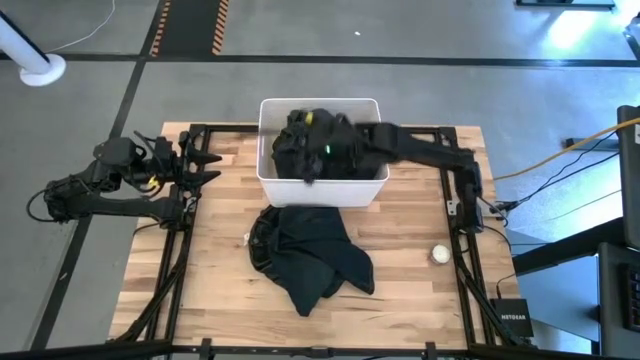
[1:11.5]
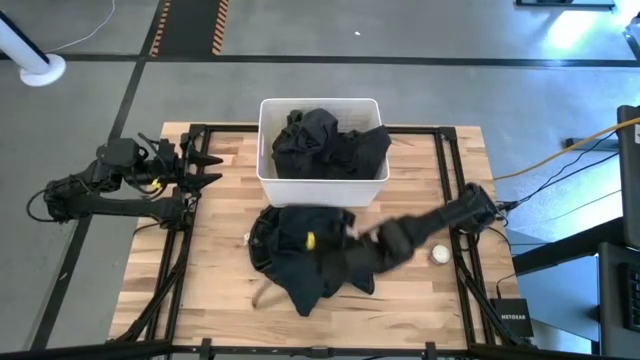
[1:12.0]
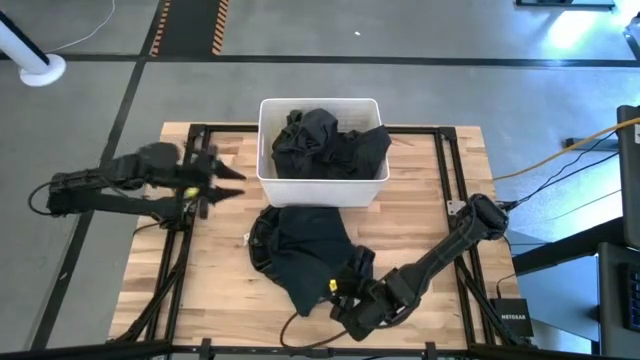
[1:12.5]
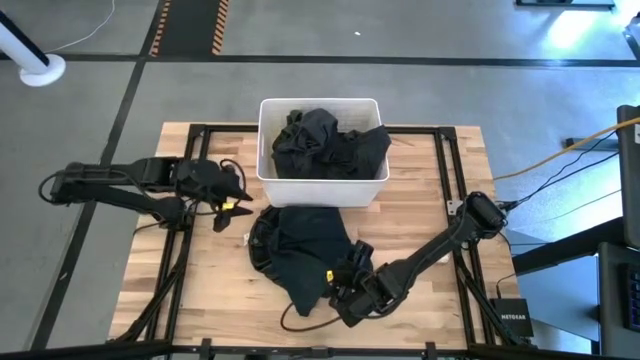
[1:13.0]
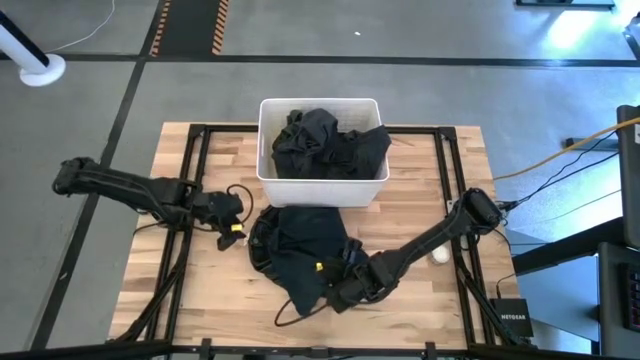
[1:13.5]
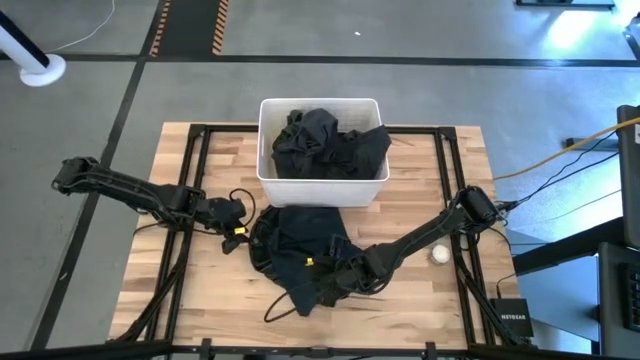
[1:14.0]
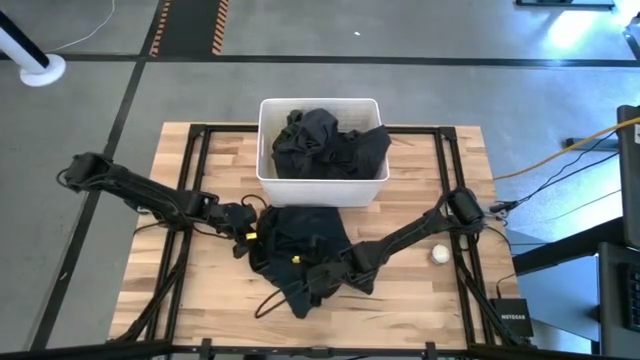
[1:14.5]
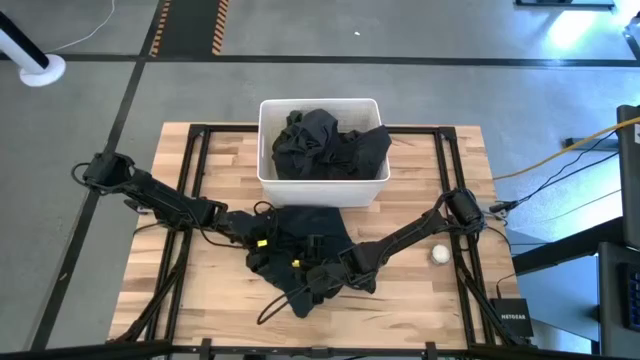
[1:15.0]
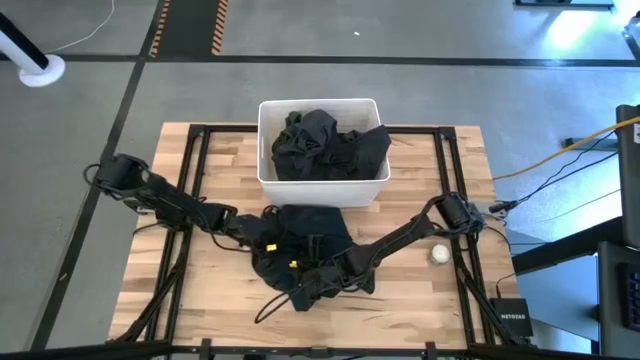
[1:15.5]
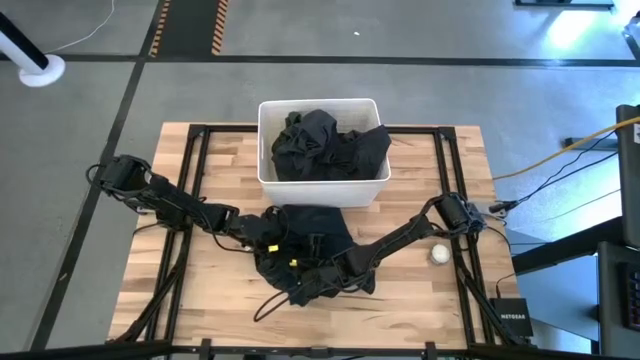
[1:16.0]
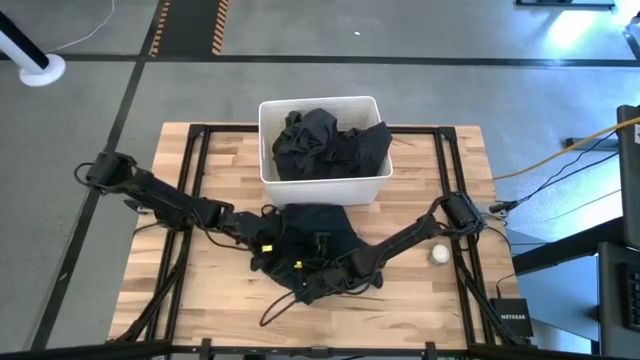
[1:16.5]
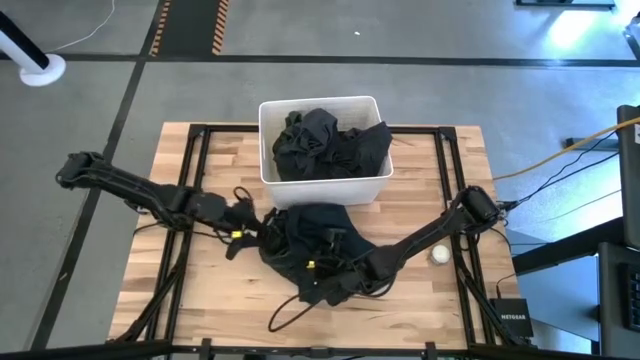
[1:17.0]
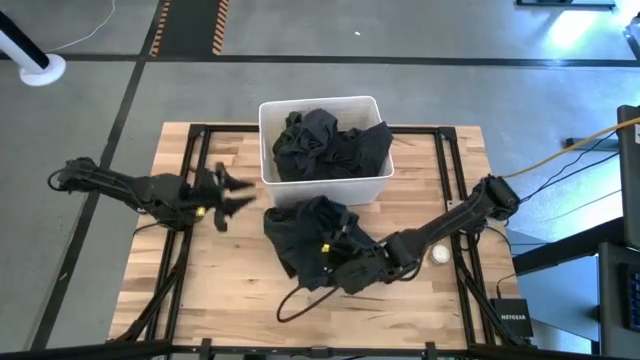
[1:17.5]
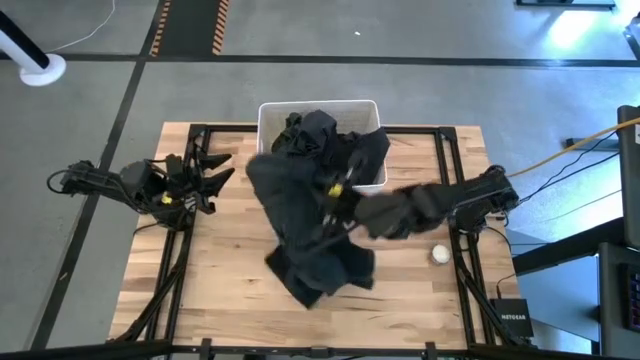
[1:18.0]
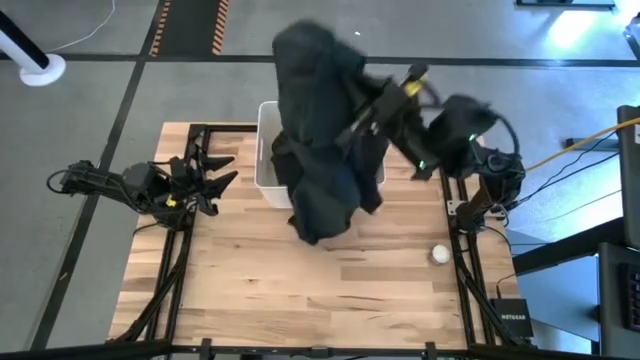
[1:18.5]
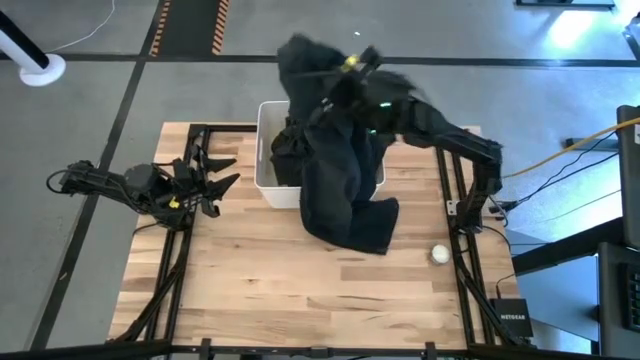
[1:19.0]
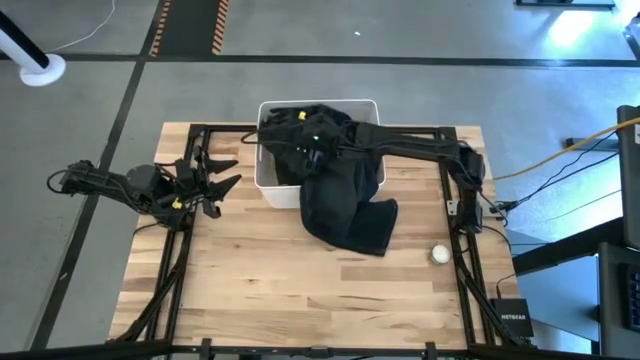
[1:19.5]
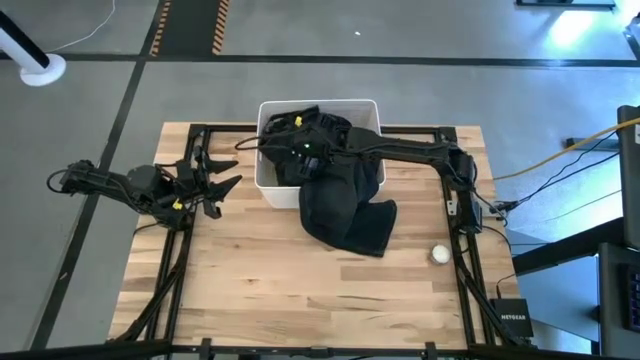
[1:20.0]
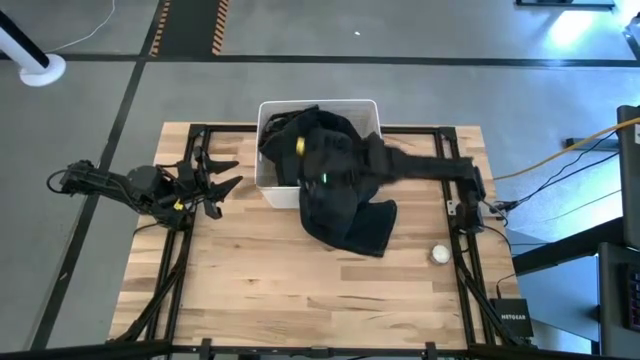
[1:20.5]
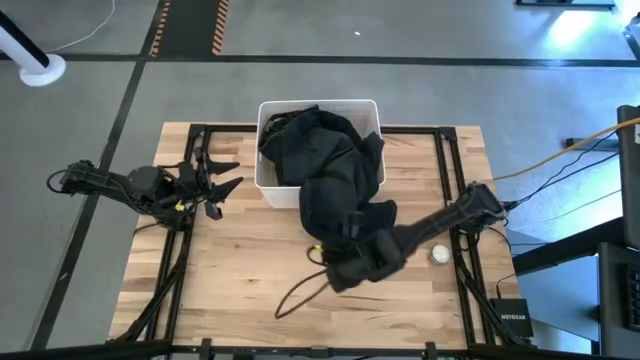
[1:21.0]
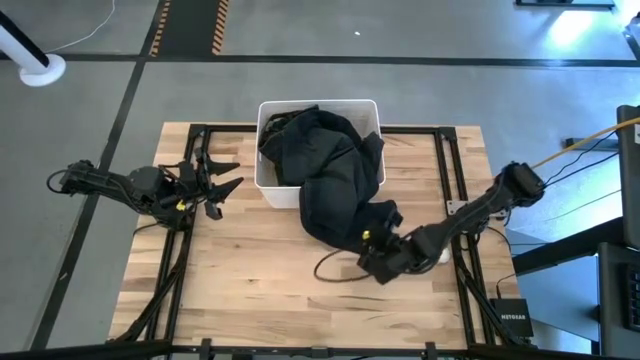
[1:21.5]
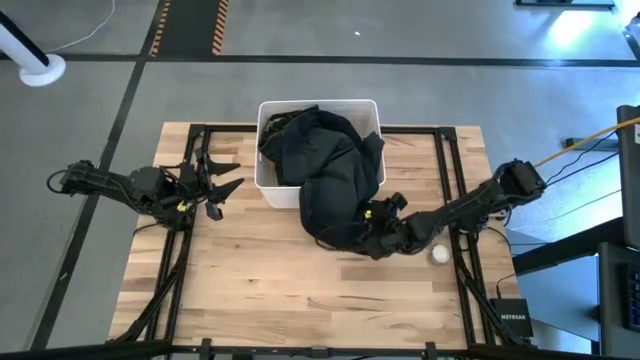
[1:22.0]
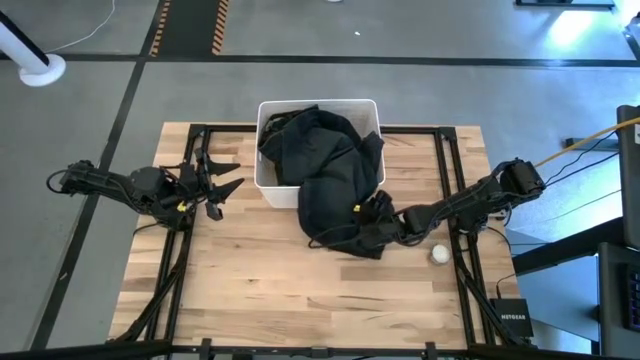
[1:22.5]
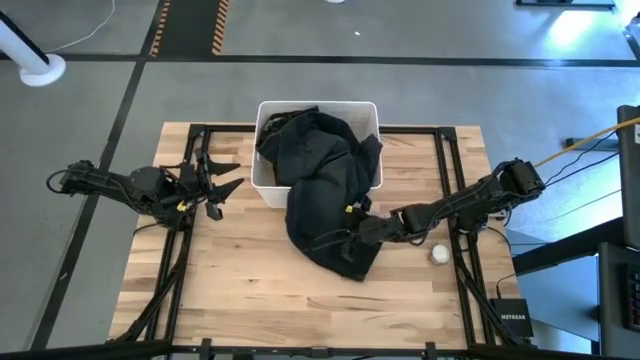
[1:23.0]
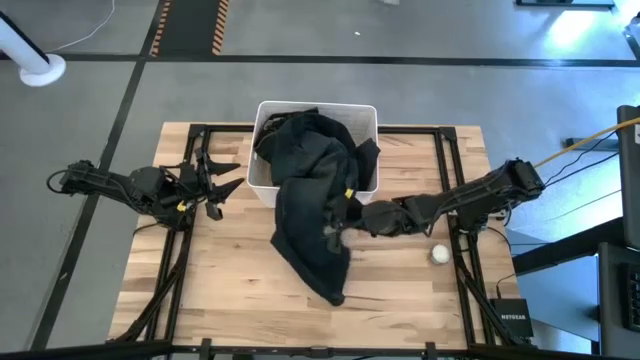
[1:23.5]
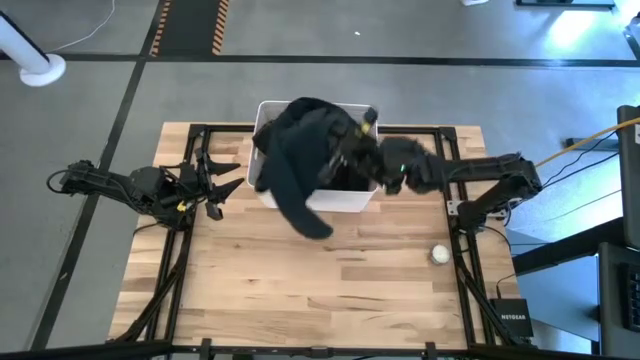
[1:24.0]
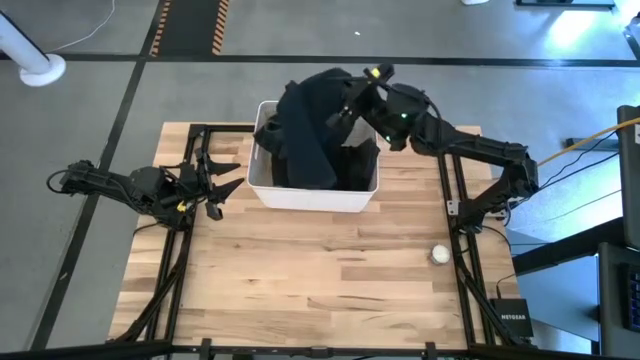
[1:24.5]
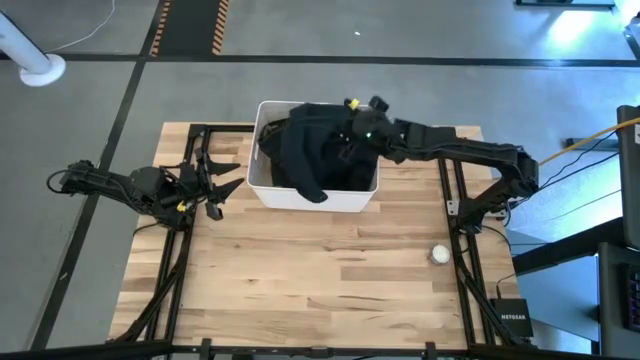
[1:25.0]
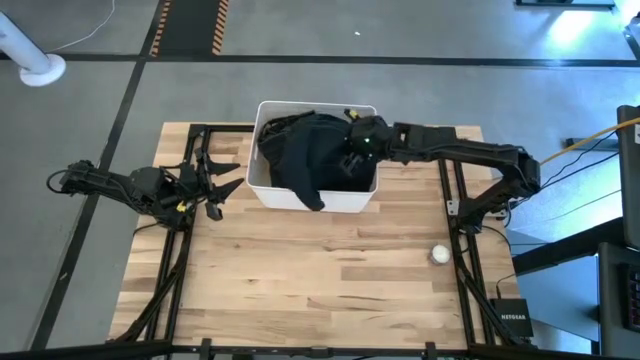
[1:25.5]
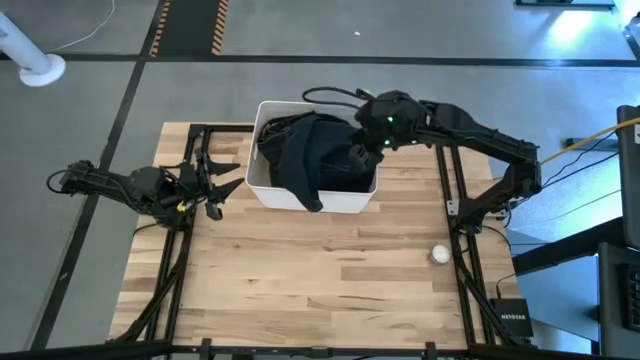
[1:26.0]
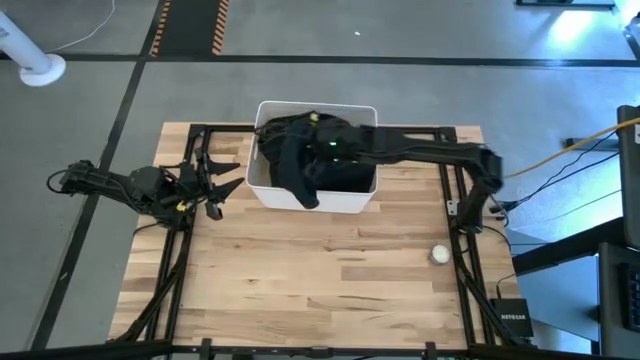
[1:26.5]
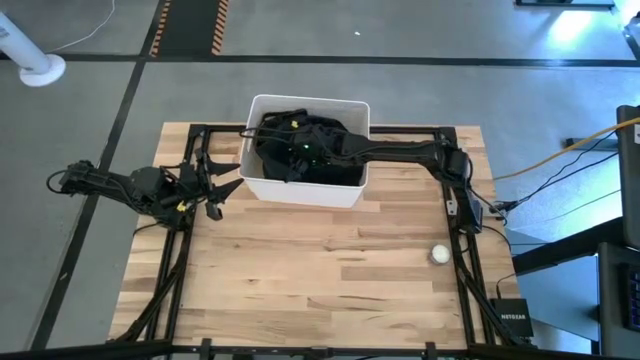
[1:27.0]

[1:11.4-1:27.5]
Task: Sort clothes
Put the blue pants into the white bin

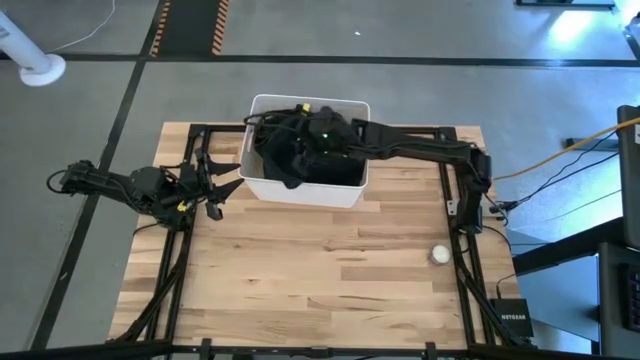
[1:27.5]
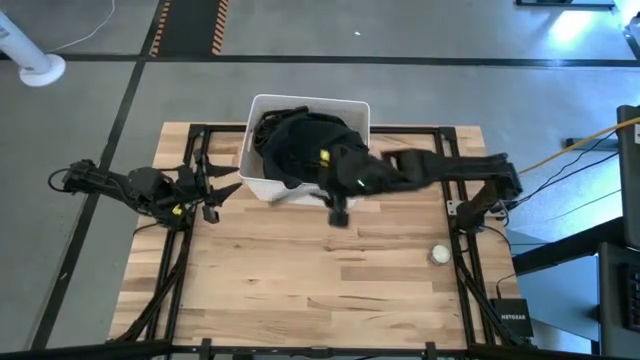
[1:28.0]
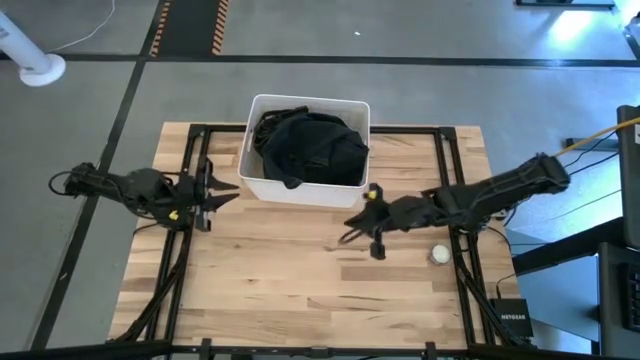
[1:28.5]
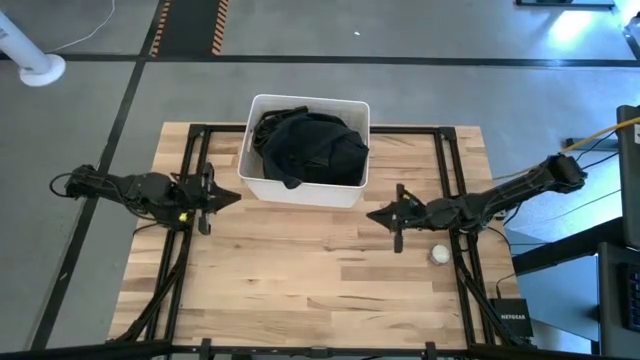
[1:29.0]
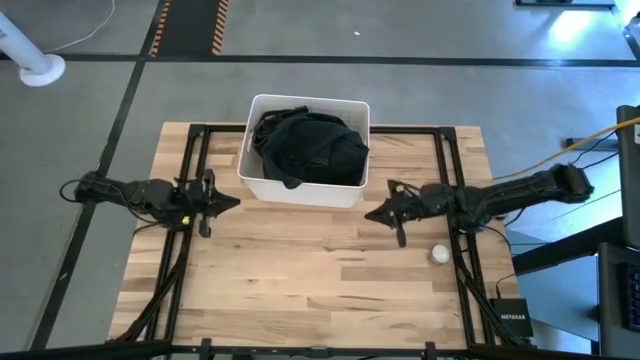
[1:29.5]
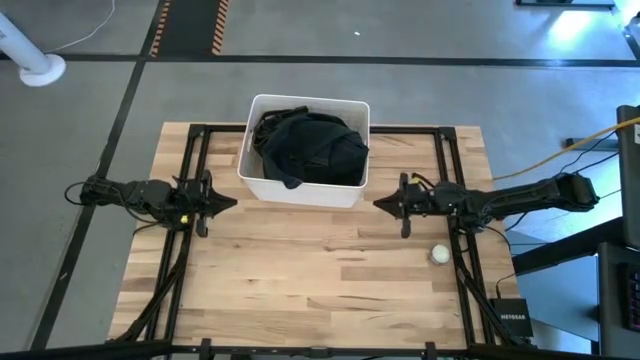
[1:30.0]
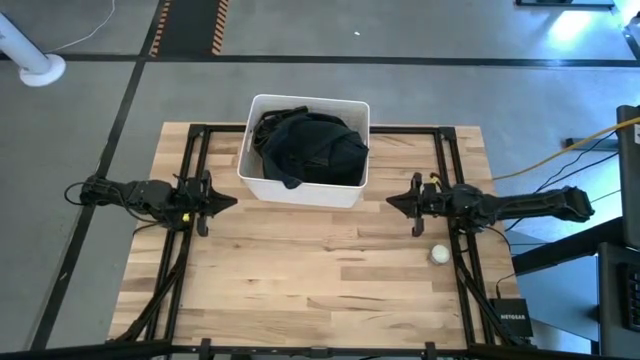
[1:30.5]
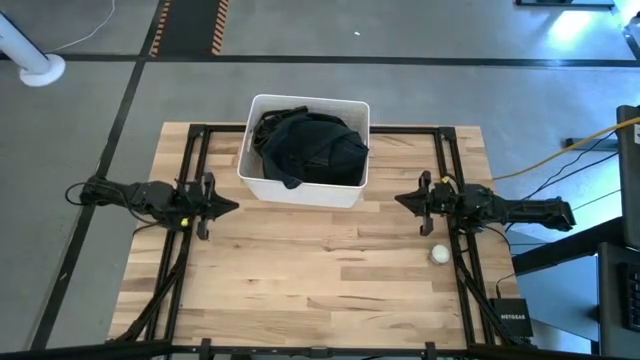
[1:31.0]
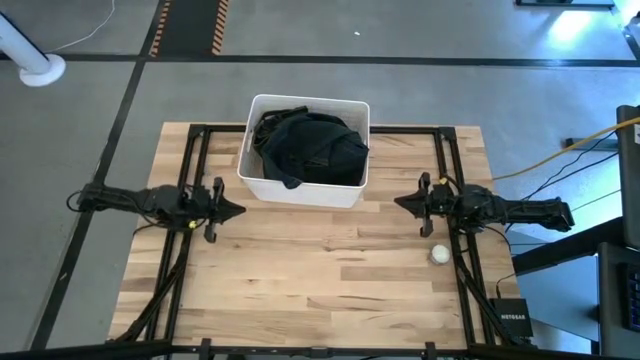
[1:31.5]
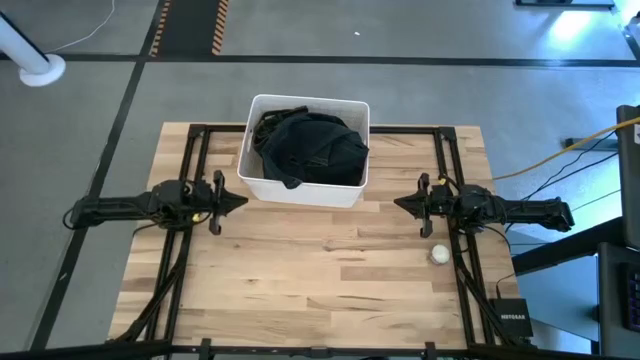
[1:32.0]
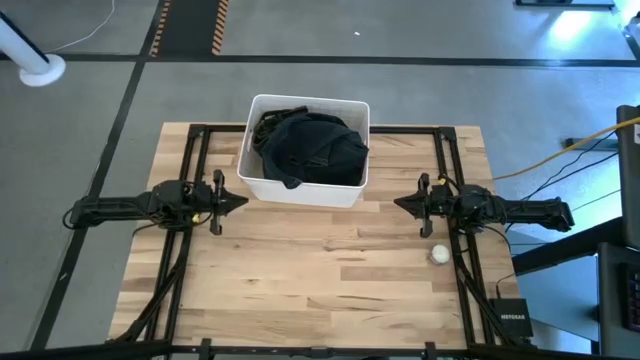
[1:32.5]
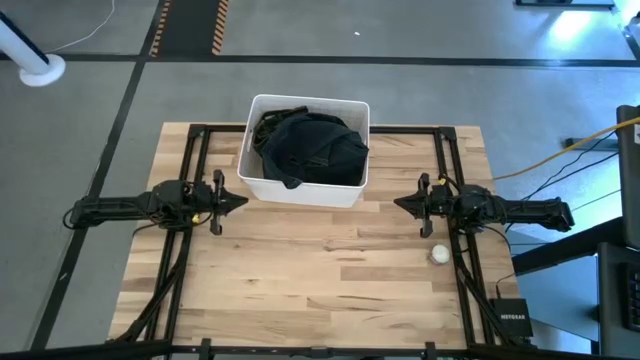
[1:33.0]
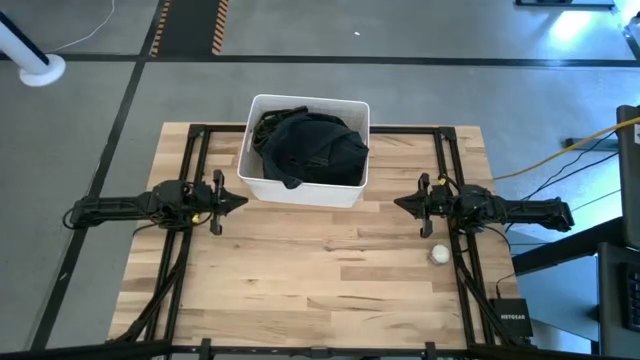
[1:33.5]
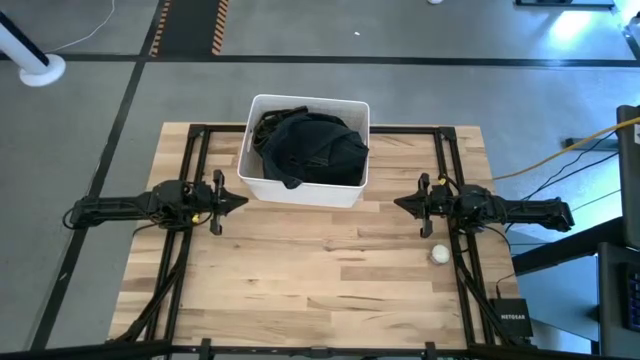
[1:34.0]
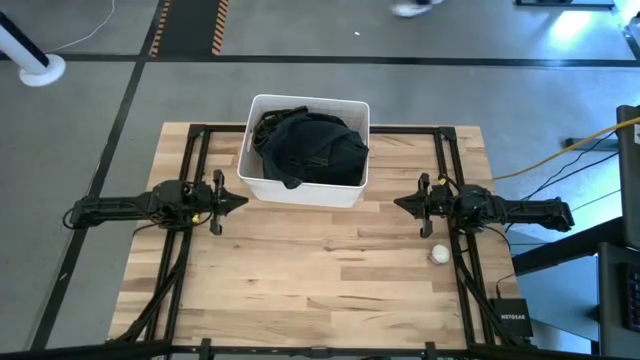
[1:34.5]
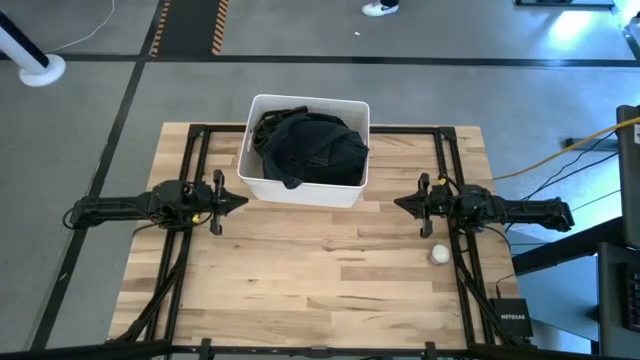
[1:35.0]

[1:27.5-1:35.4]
Return to Home Position
